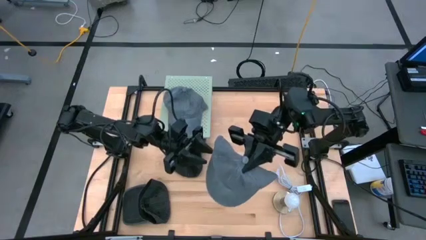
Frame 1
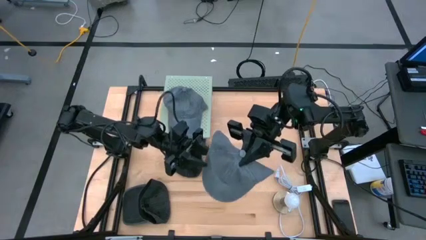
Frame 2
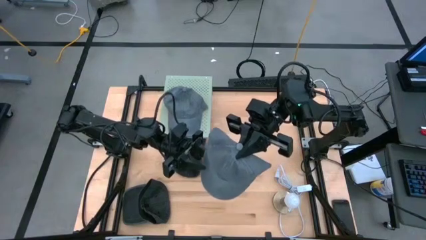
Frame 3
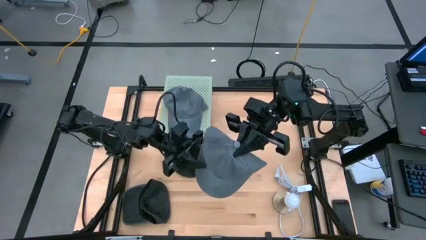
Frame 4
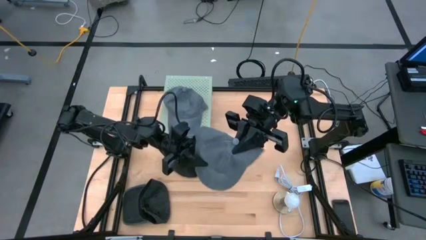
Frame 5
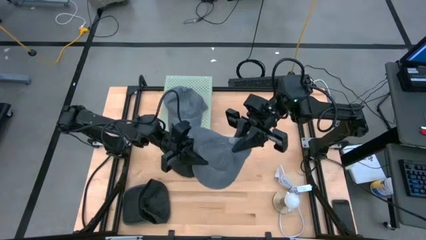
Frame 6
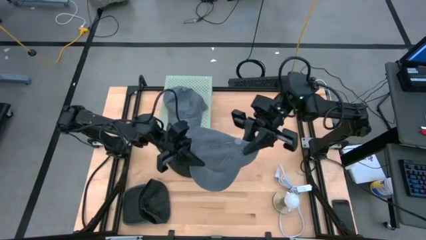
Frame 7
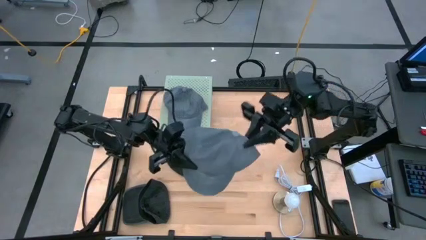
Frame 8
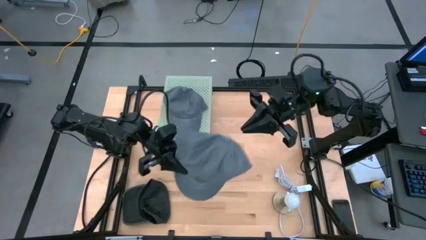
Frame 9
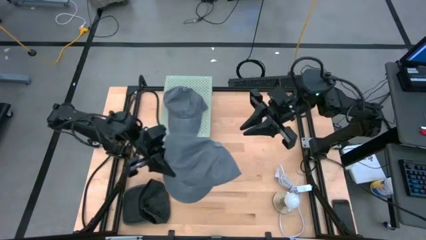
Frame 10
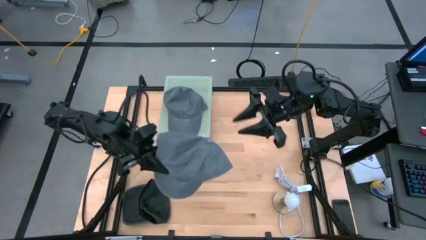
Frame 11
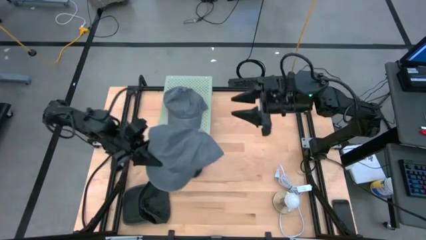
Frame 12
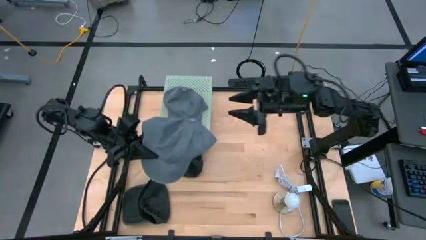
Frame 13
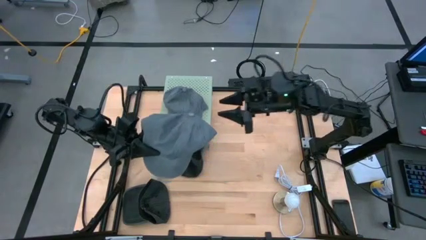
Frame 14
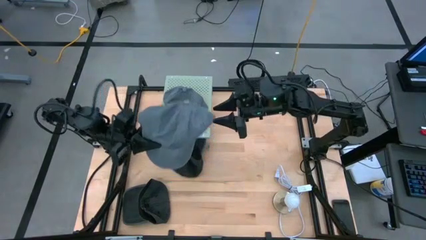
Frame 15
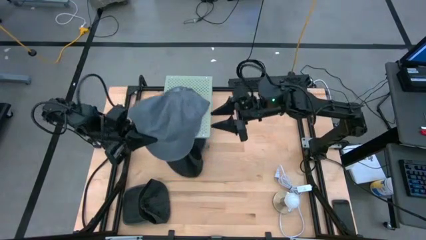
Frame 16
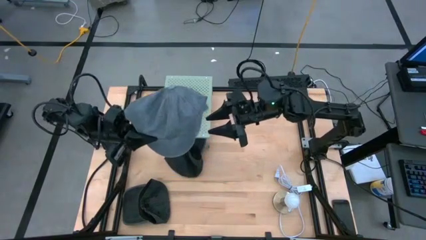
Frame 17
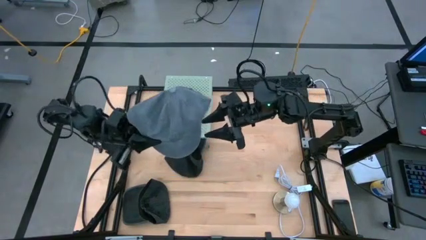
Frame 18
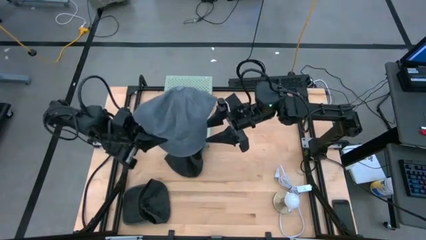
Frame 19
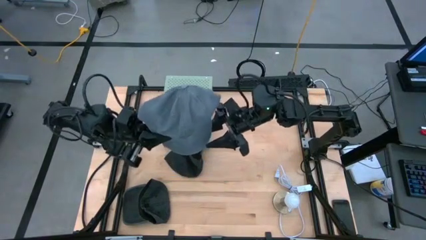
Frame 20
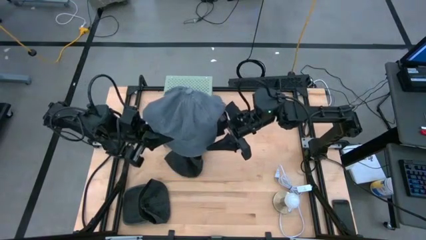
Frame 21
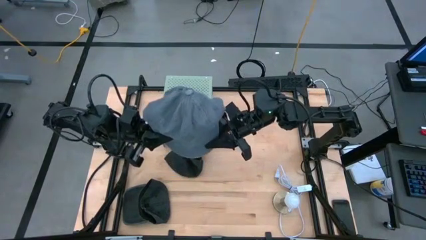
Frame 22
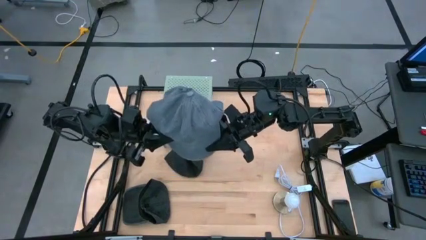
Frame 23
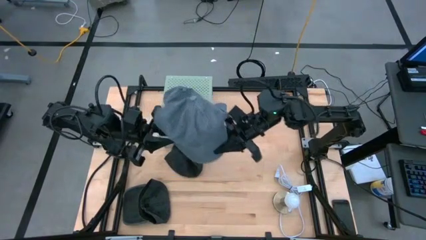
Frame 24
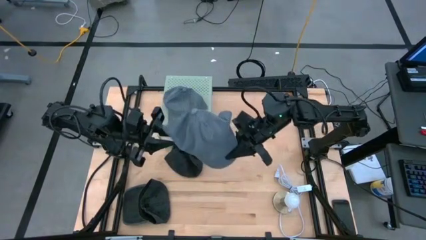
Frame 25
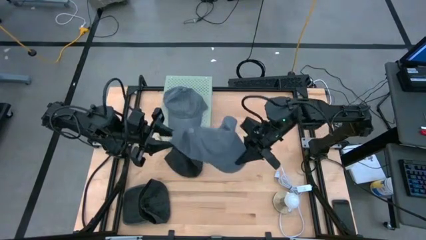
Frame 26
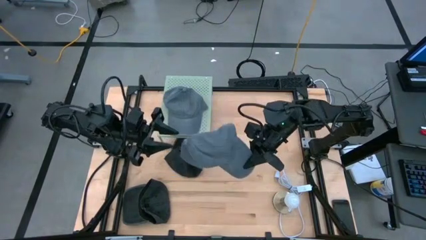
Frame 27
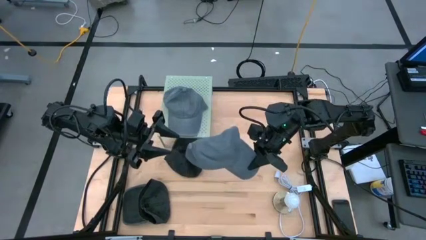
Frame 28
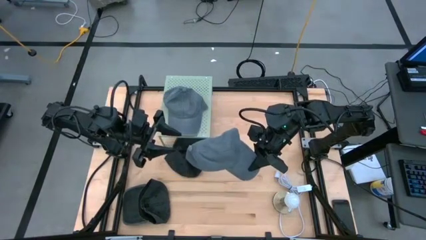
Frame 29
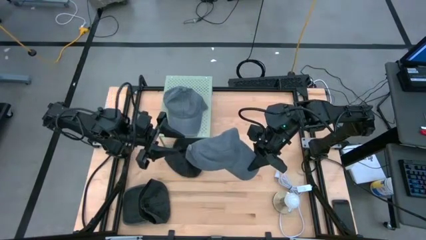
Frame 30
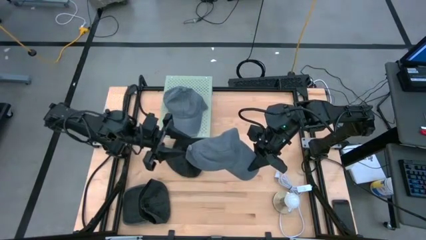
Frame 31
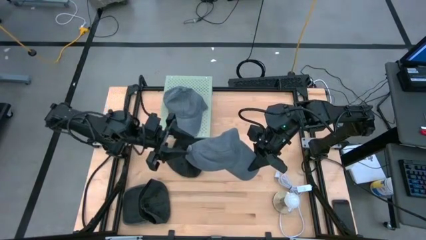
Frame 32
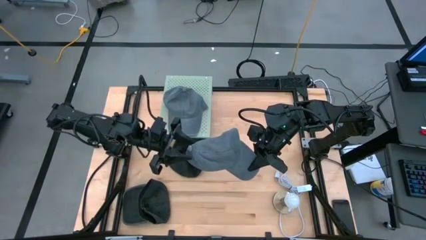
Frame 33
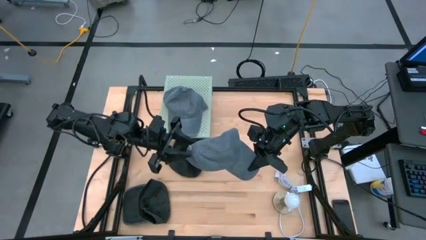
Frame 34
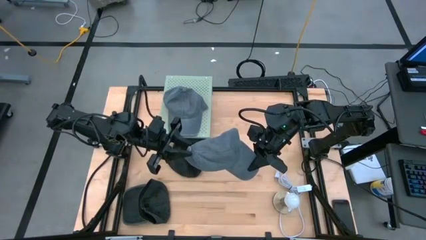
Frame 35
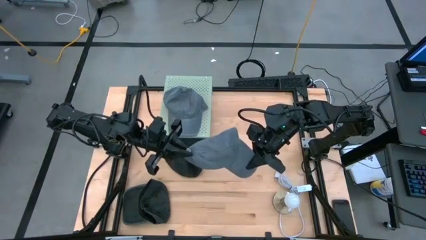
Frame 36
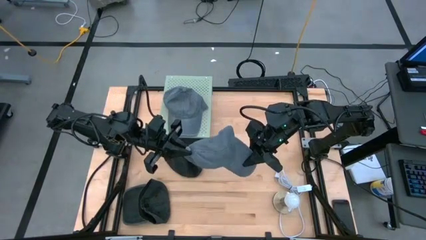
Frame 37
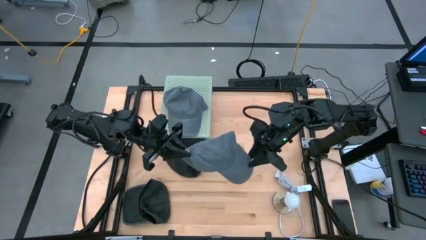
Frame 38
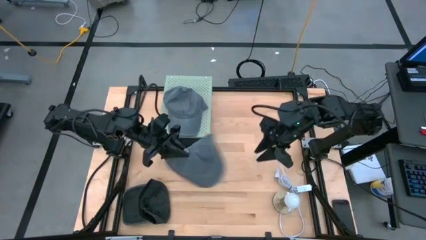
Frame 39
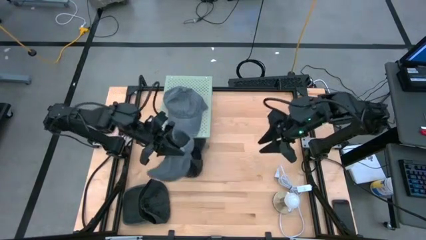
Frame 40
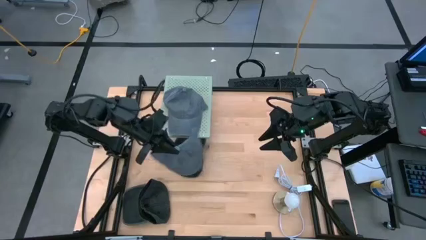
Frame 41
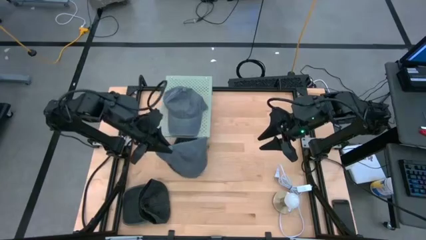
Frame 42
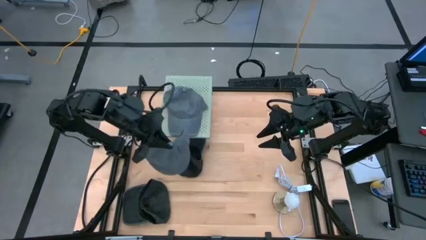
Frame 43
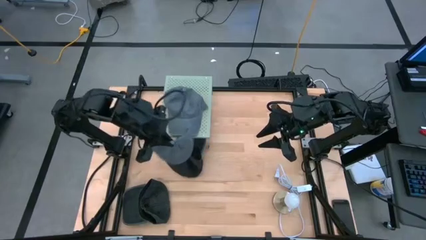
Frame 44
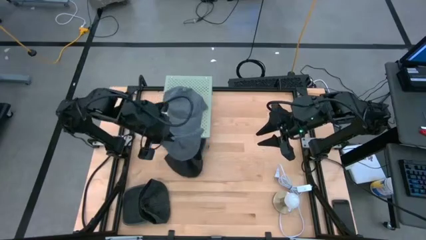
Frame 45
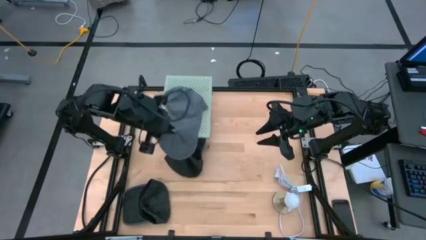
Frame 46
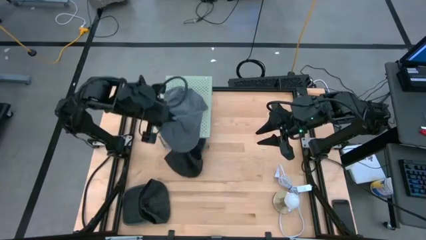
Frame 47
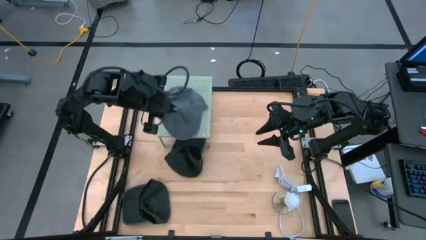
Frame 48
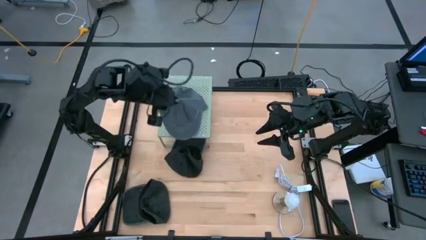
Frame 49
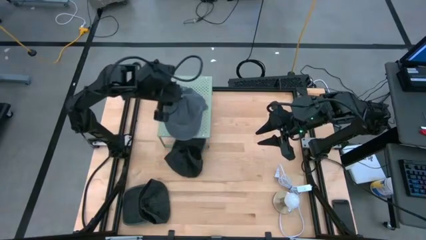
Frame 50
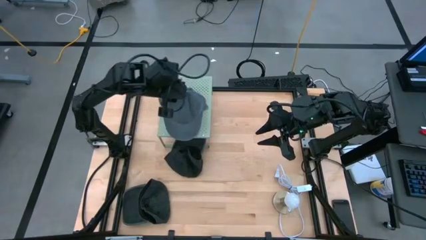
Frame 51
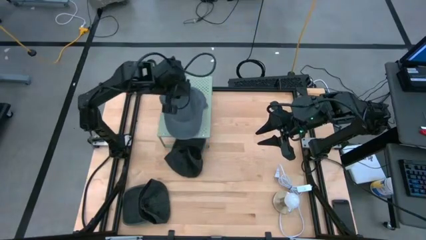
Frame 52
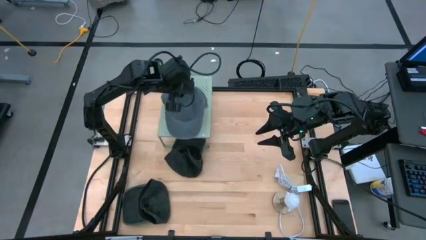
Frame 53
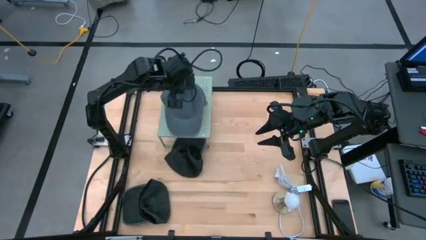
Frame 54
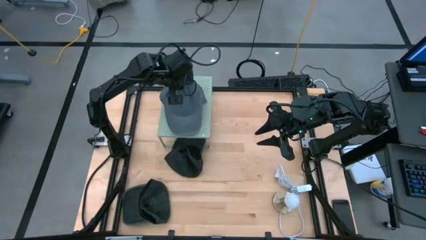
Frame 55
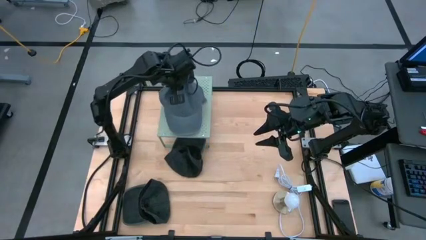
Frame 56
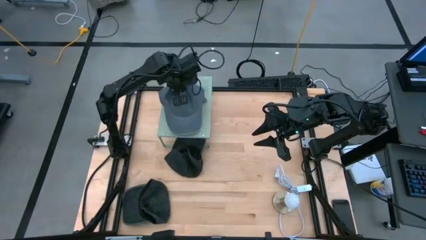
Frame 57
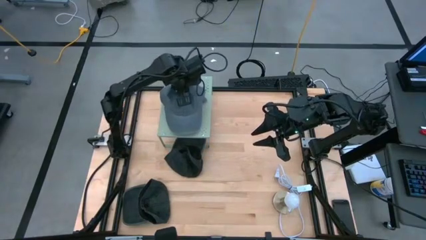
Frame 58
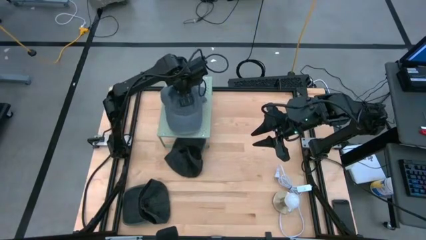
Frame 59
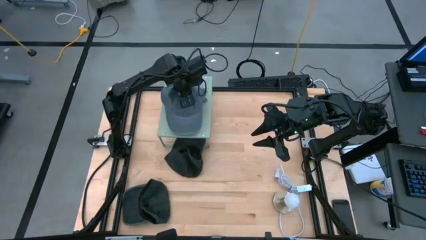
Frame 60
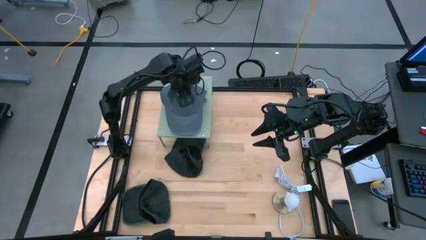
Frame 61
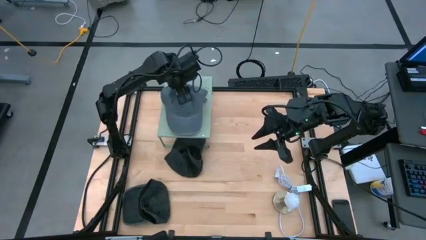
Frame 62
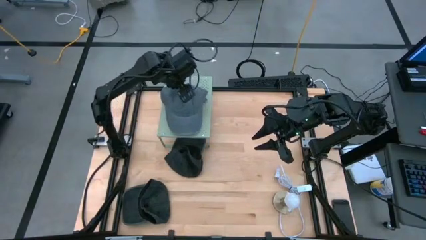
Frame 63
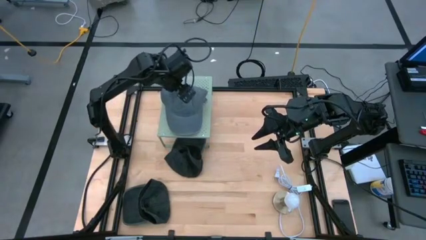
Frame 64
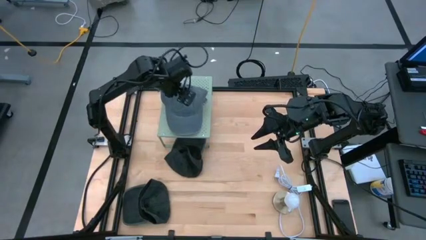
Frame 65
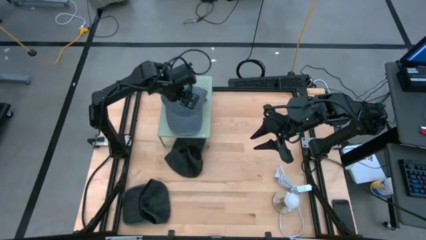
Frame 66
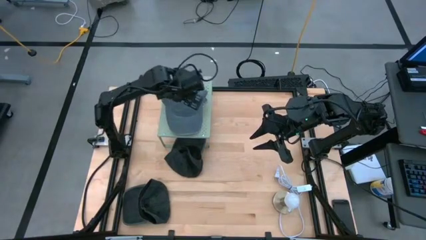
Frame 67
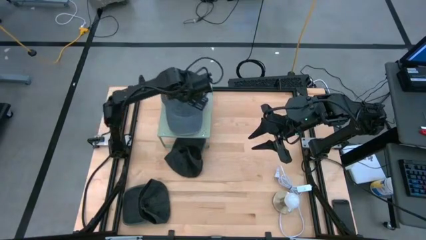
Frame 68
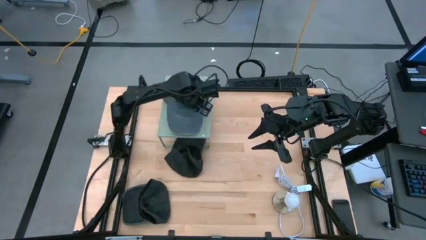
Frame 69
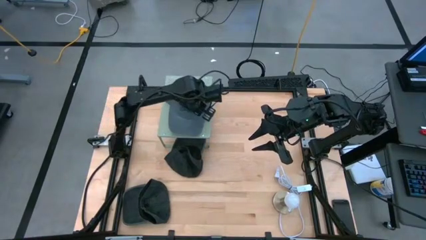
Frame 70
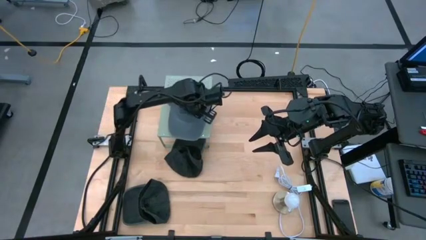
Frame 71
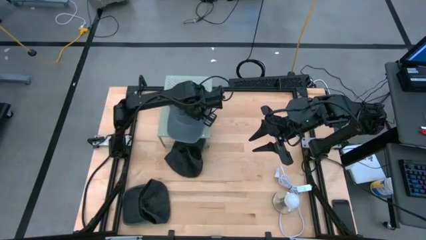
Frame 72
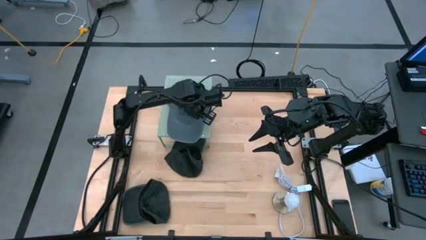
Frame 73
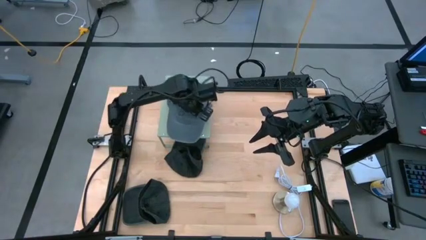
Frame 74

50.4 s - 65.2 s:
Task: Pick & Place hat
Stack the gray cap on the gray cap on the shelf

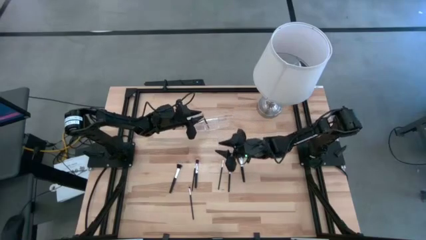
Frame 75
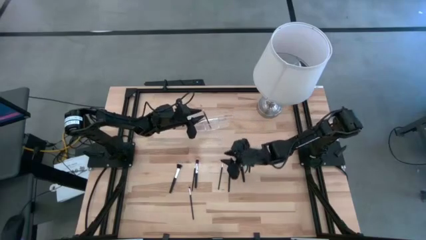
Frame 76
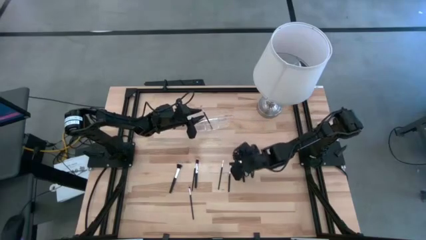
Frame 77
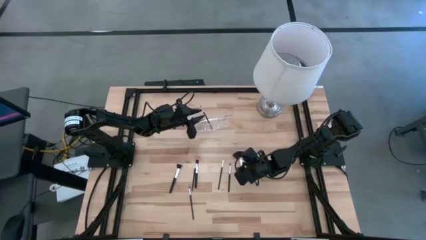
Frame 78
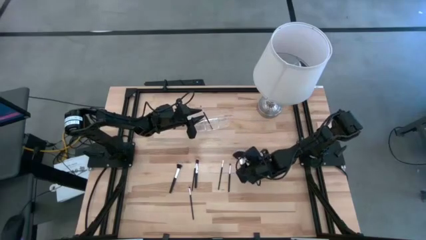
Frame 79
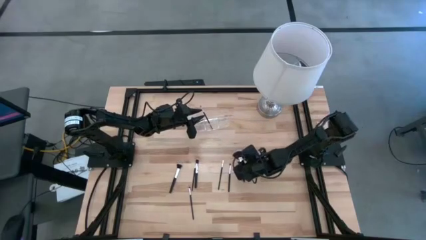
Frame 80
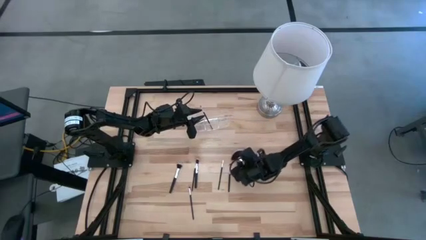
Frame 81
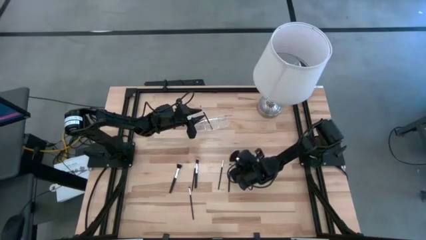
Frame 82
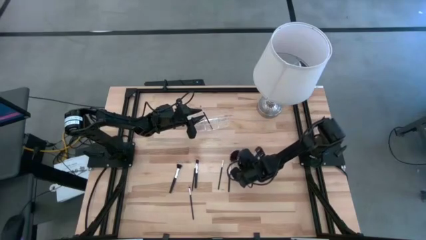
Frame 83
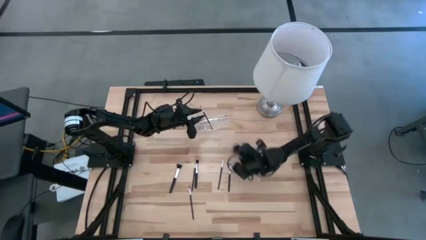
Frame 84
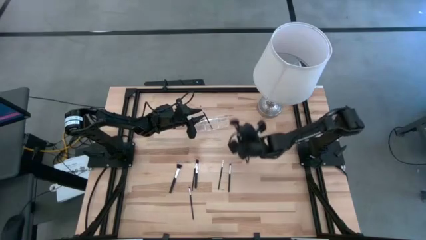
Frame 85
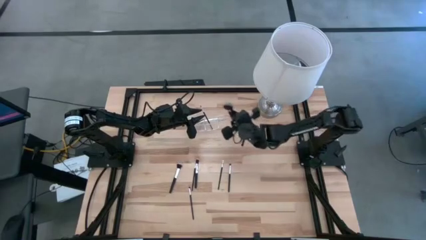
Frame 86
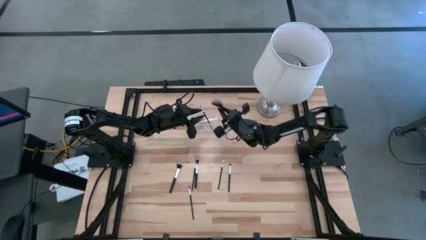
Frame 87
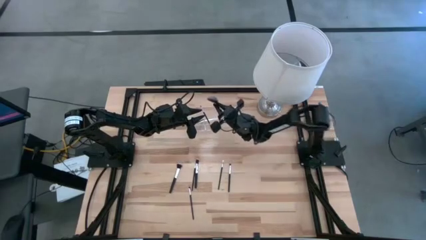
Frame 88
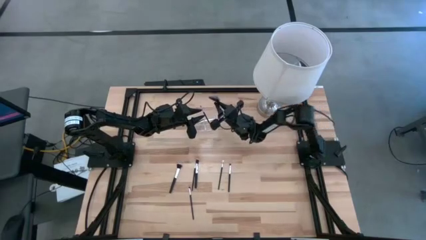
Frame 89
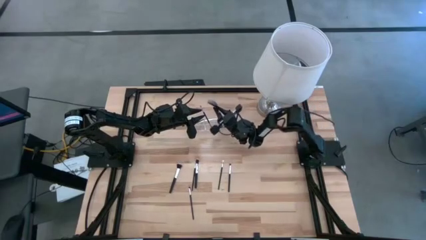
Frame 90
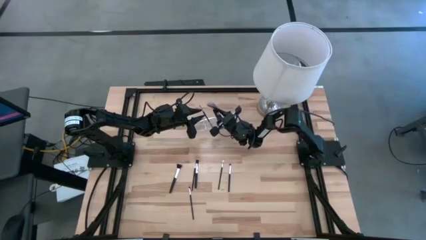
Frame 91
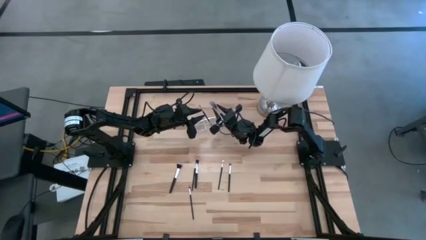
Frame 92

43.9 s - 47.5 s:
Task: Sort items
Put the highlighter brush into the transparent organizer
